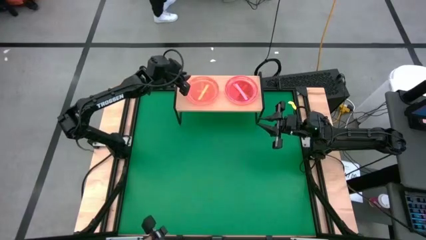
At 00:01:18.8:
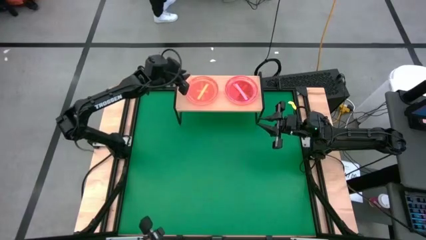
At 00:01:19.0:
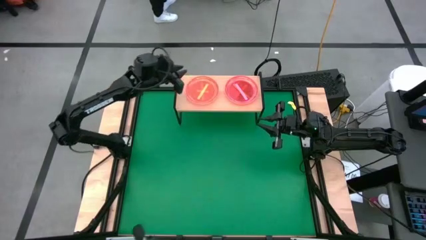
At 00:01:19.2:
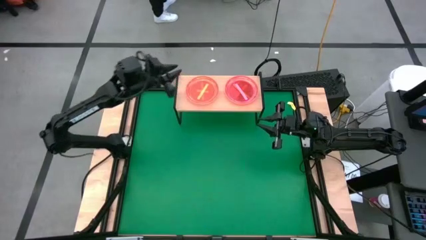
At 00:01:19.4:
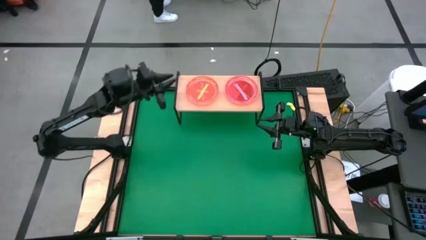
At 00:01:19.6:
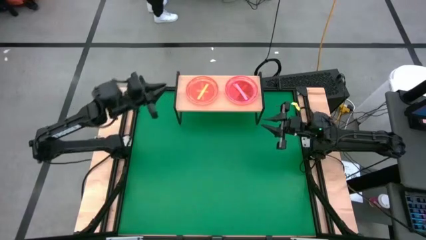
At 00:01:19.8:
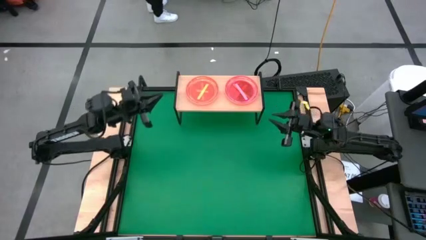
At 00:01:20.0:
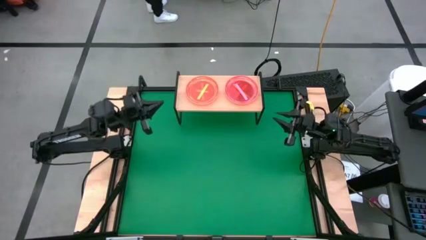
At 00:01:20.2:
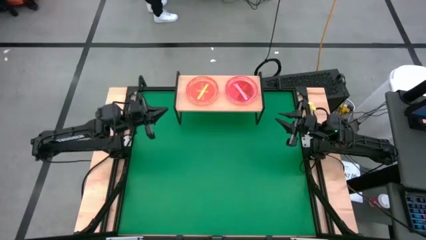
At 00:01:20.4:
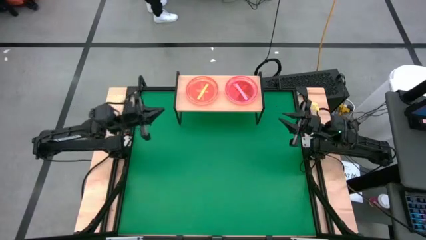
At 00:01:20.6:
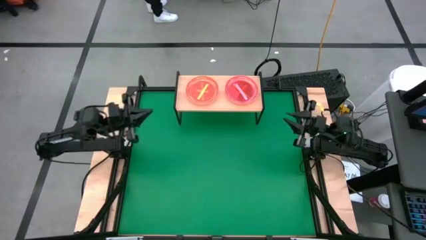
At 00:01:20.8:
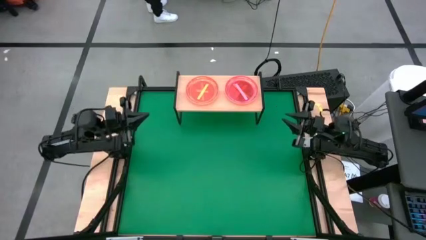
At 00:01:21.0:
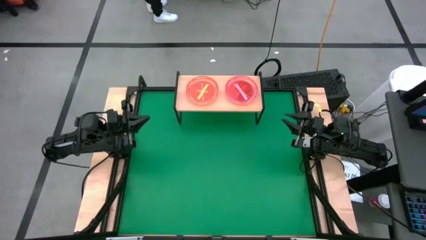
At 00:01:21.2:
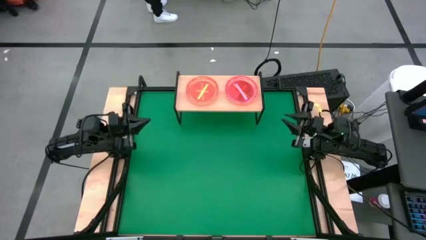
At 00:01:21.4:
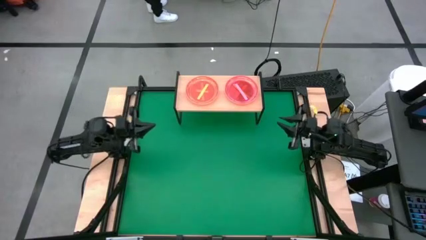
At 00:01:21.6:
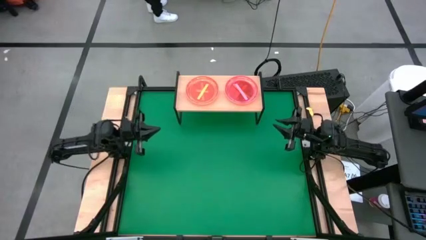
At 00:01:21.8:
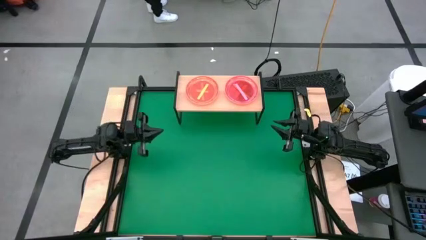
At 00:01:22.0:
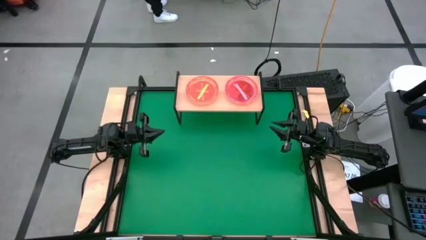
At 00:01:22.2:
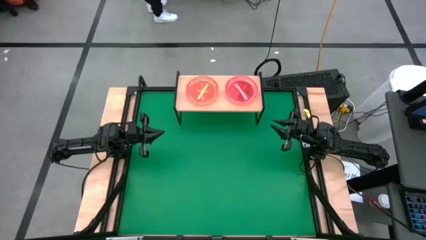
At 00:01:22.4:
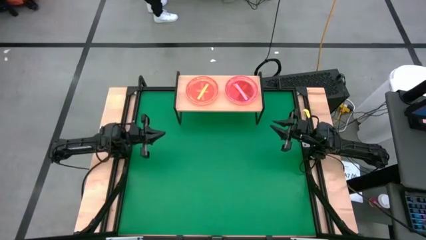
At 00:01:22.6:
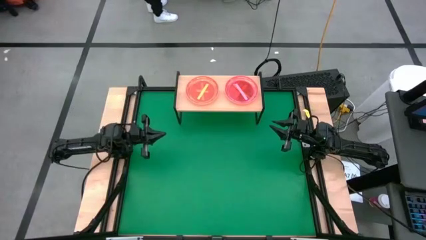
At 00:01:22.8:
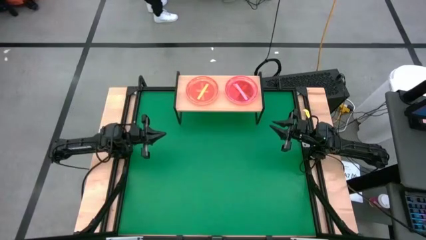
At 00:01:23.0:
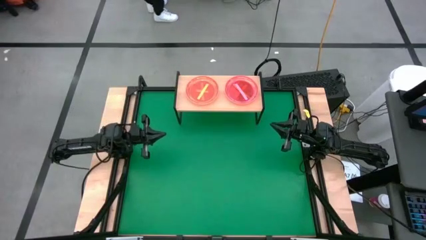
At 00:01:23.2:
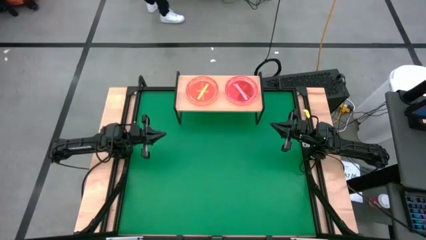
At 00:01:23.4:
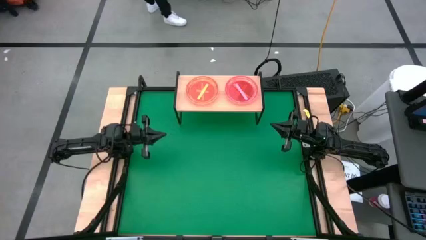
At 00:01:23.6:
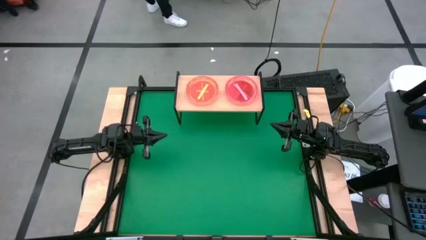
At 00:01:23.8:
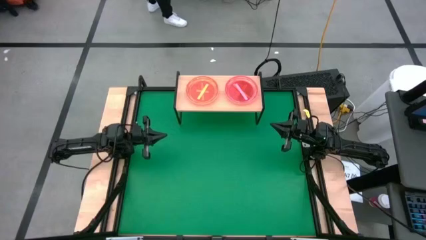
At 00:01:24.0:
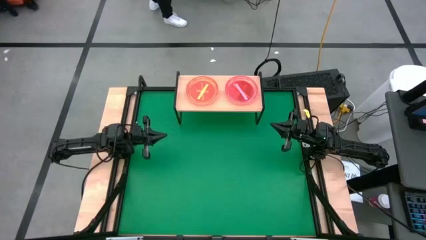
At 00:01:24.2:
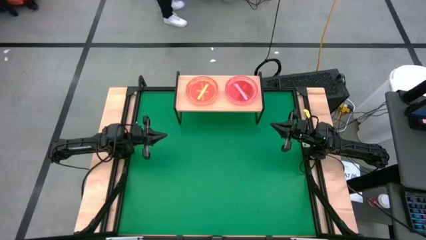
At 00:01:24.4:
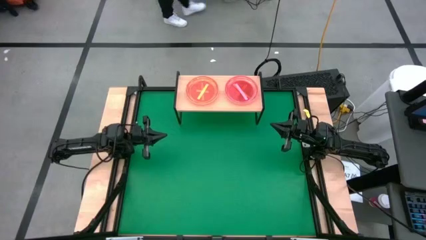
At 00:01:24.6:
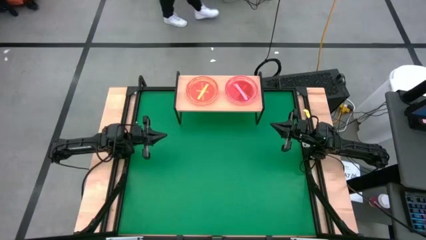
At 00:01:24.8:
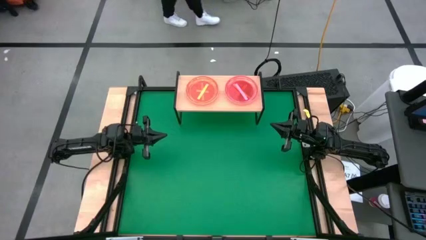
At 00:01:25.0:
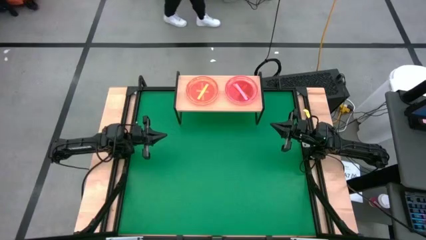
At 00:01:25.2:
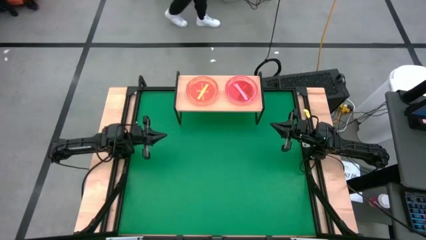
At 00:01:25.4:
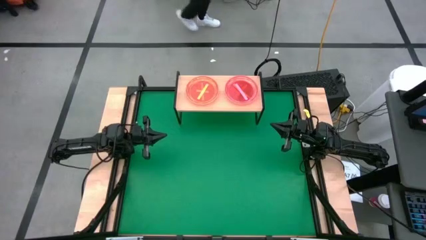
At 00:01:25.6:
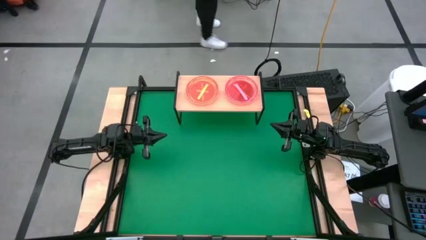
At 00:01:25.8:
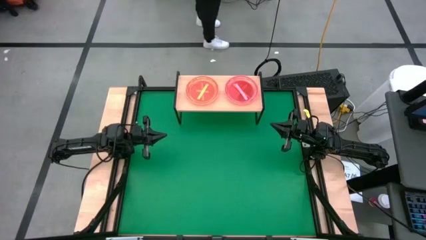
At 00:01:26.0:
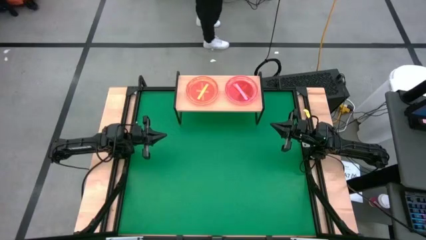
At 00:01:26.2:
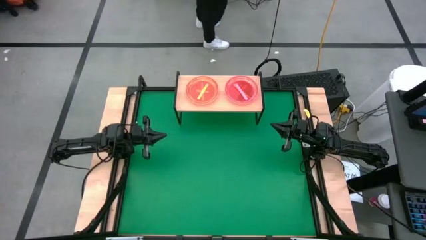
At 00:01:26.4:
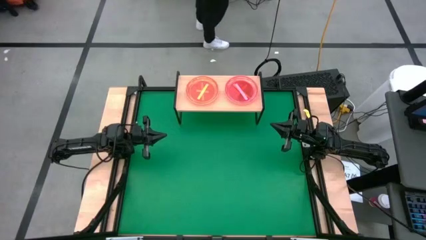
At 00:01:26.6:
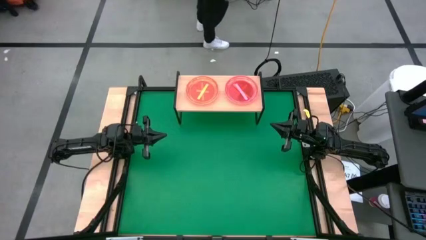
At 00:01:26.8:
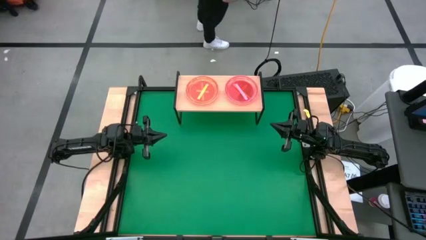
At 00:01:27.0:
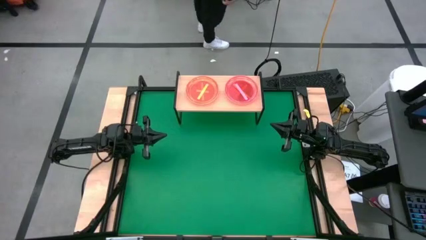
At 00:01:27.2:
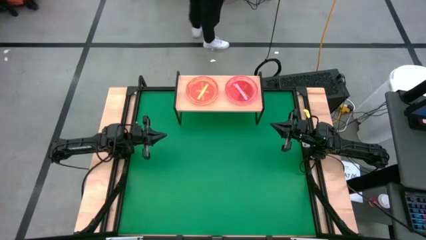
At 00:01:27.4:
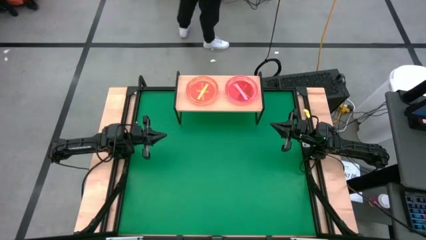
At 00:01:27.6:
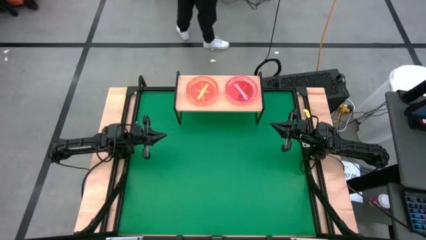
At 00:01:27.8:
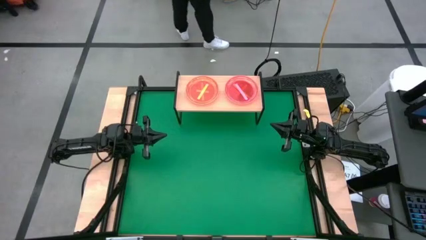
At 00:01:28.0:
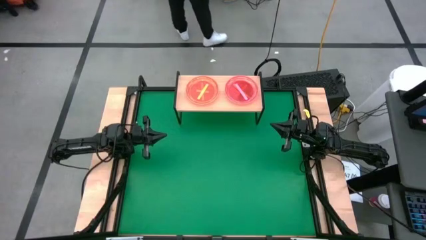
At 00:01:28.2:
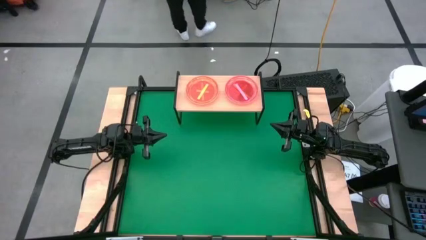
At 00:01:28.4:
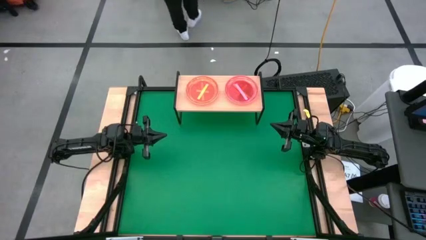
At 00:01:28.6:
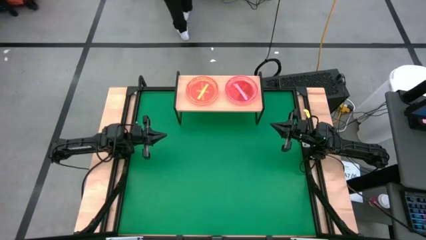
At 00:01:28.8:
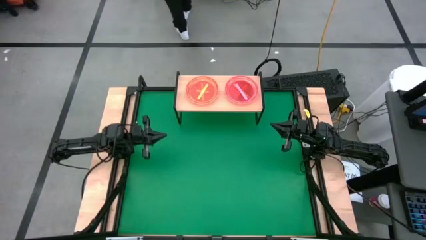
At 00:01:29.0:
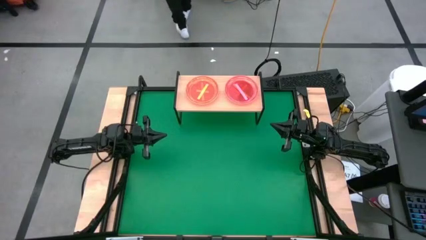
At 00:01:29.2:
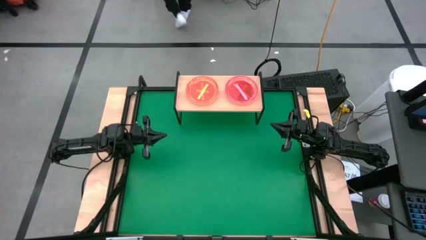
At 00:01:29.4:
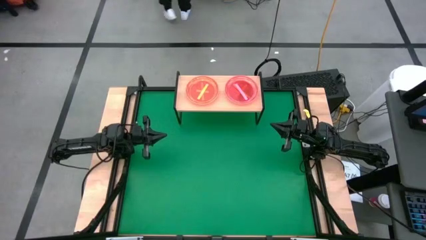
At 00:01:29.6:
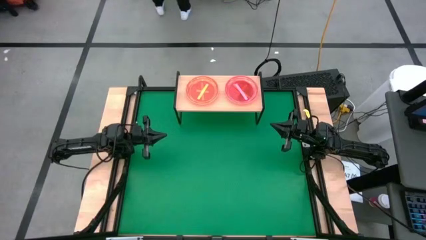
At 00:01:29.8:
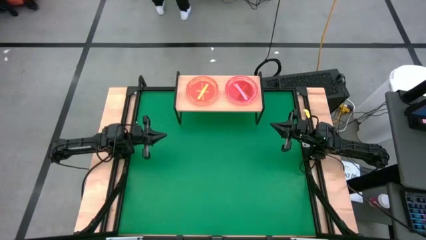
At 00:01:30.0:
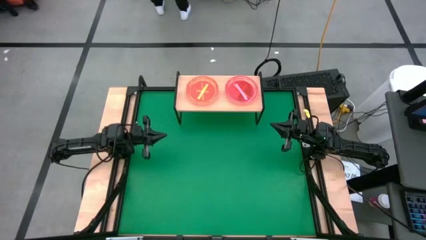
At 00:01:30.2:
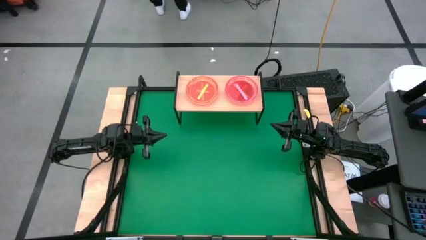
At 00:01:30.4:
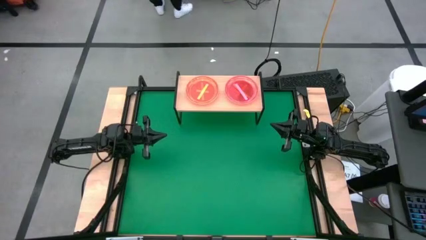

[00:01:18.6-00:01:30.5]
Task: Place and stack plates onto a shelf
Return to Home Position
